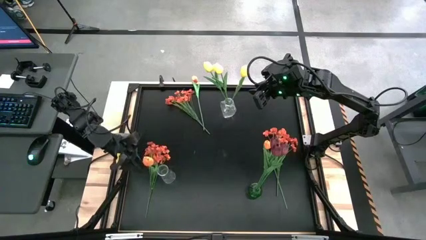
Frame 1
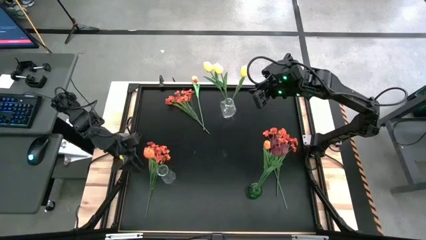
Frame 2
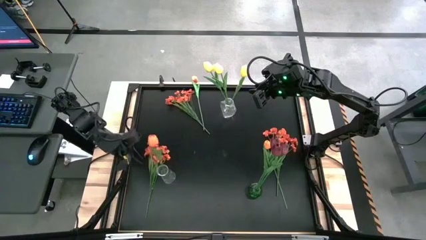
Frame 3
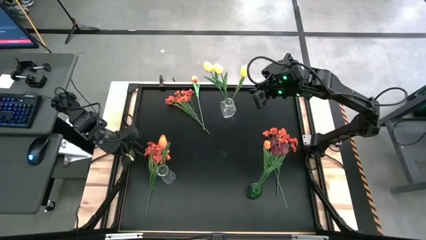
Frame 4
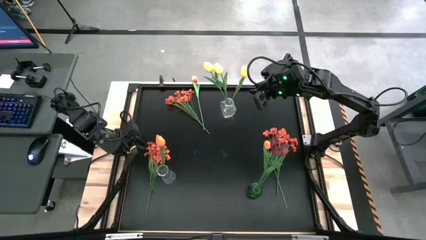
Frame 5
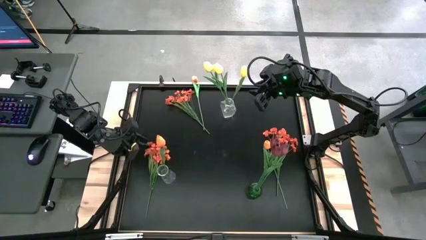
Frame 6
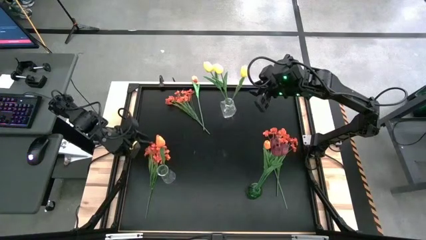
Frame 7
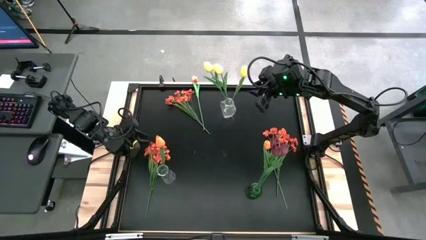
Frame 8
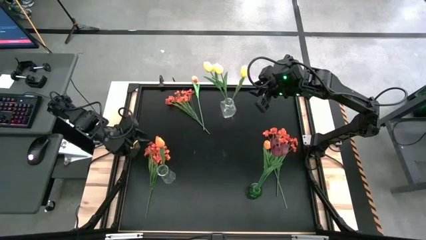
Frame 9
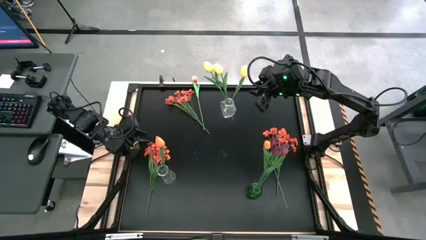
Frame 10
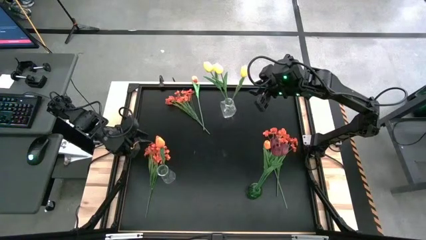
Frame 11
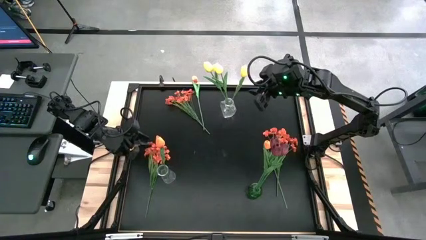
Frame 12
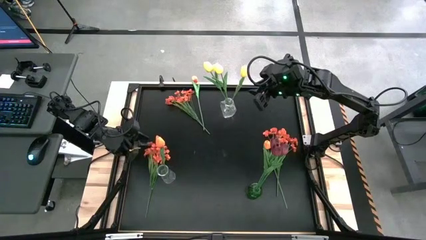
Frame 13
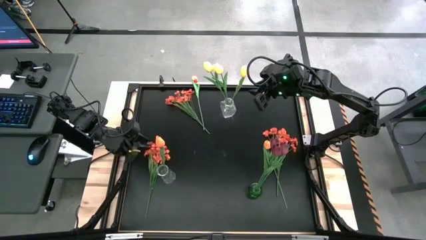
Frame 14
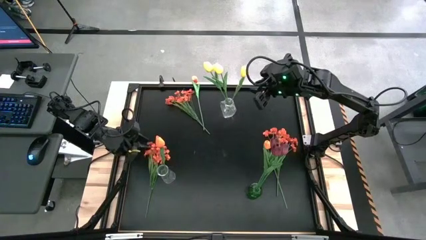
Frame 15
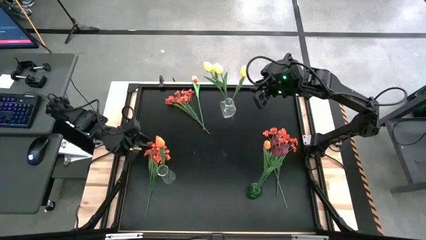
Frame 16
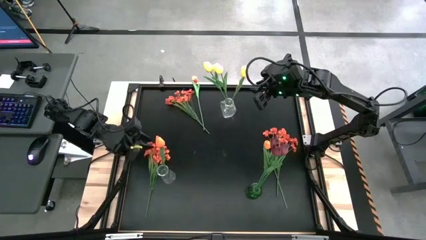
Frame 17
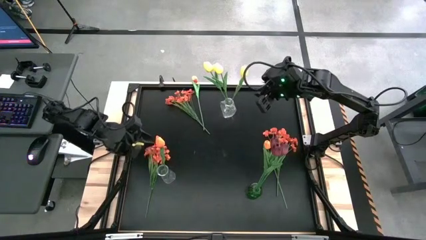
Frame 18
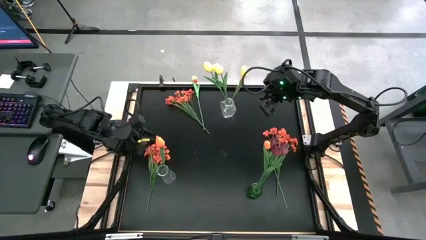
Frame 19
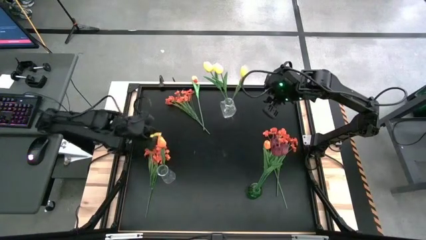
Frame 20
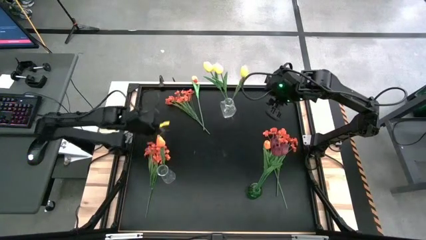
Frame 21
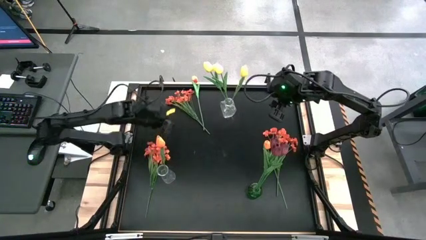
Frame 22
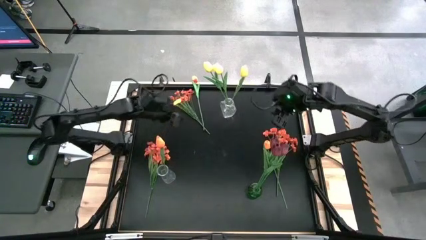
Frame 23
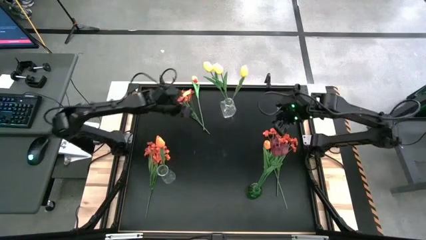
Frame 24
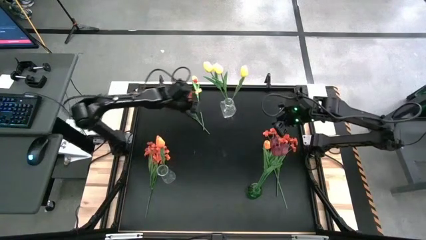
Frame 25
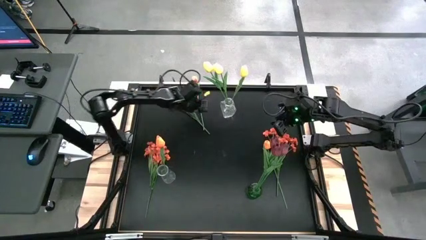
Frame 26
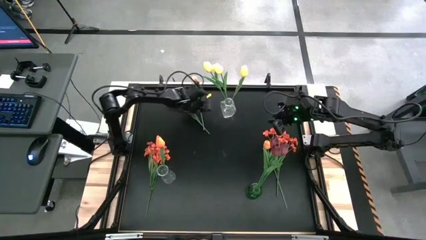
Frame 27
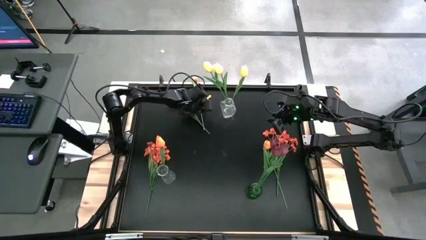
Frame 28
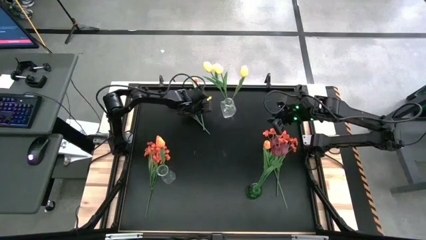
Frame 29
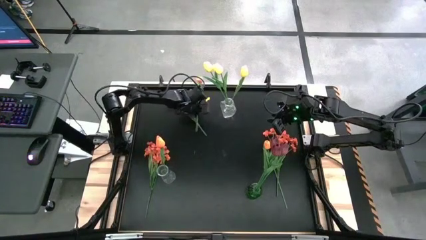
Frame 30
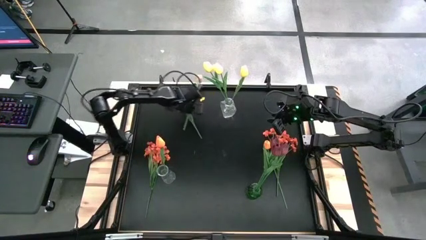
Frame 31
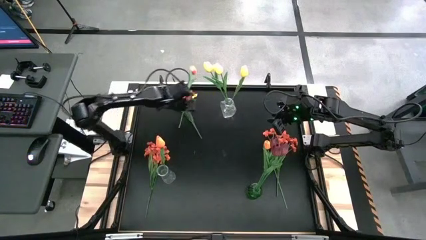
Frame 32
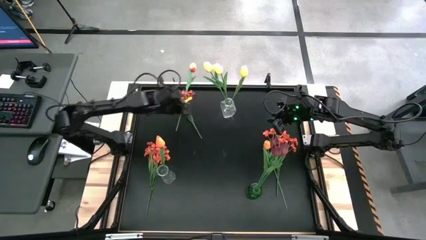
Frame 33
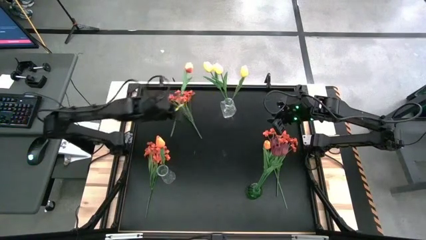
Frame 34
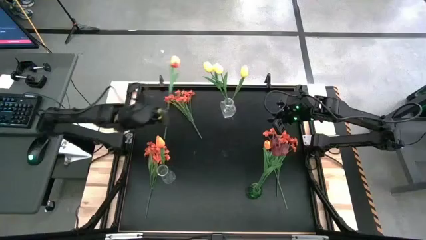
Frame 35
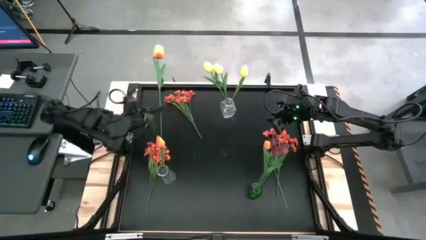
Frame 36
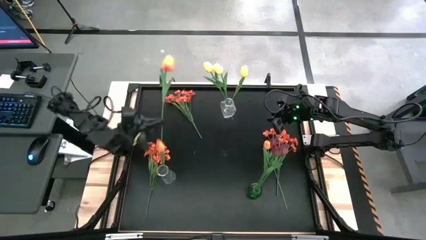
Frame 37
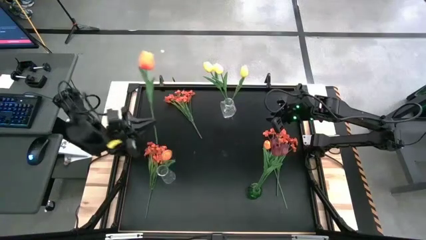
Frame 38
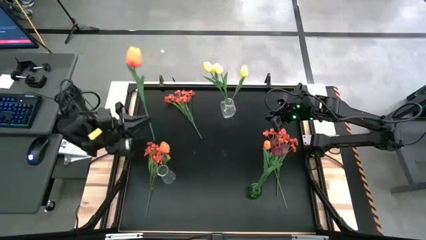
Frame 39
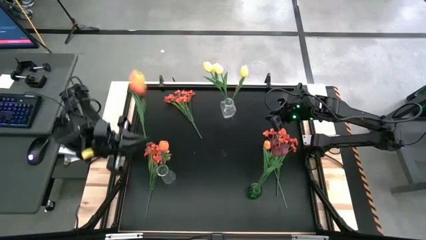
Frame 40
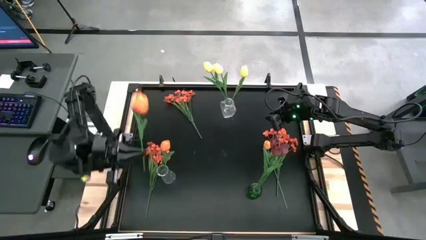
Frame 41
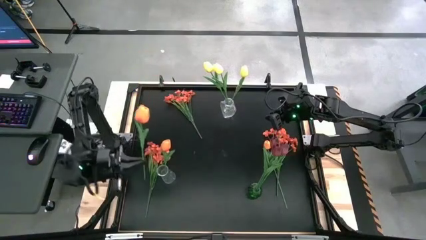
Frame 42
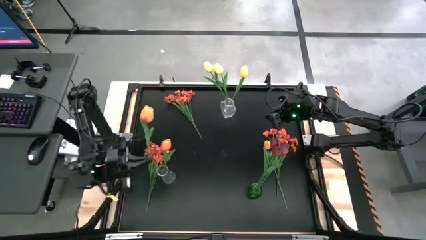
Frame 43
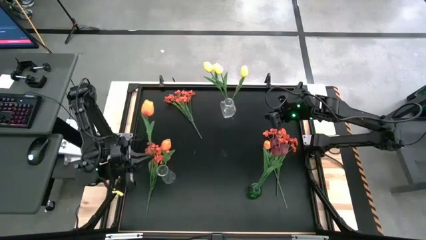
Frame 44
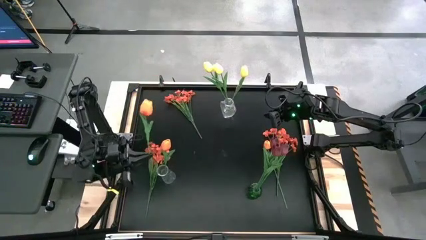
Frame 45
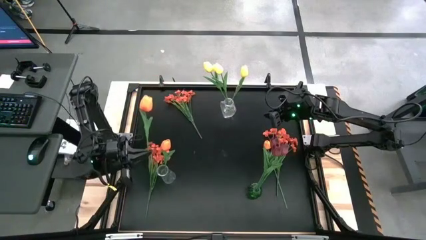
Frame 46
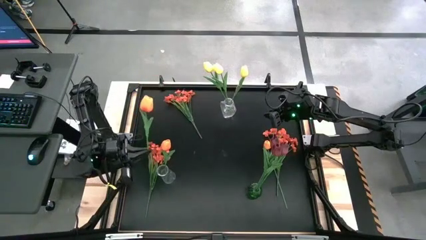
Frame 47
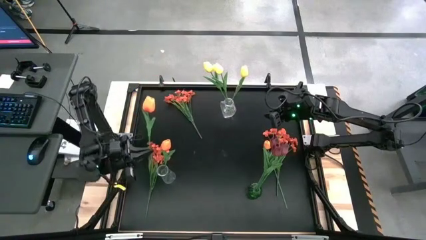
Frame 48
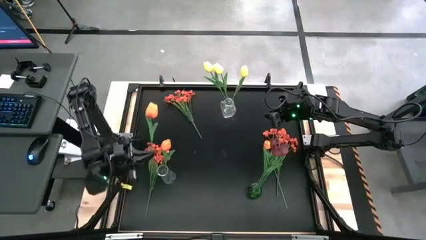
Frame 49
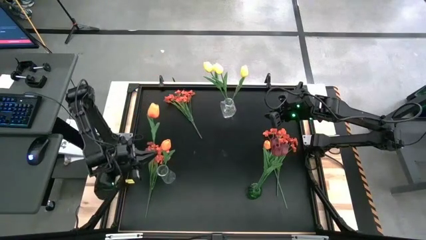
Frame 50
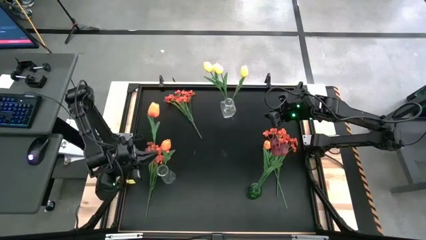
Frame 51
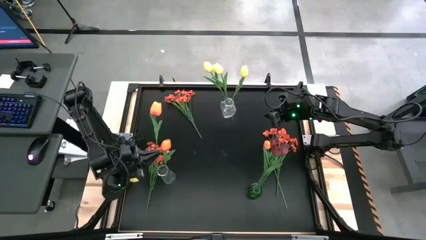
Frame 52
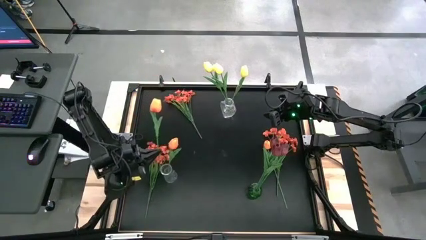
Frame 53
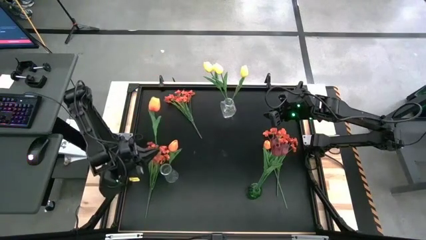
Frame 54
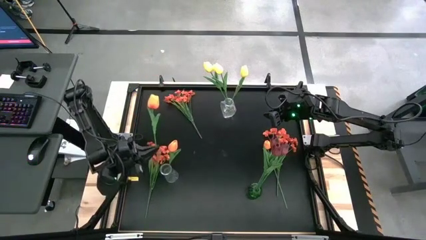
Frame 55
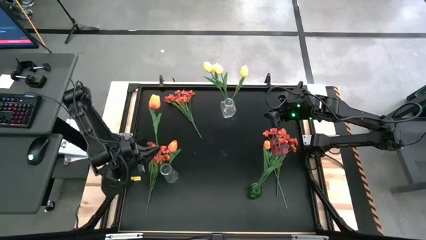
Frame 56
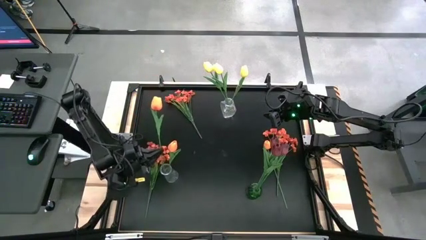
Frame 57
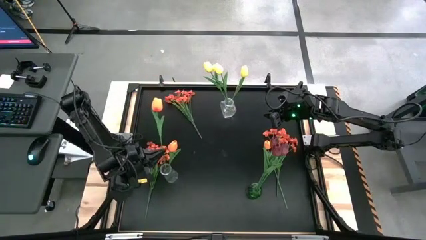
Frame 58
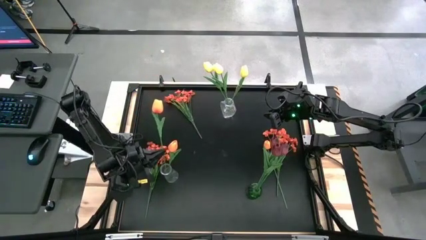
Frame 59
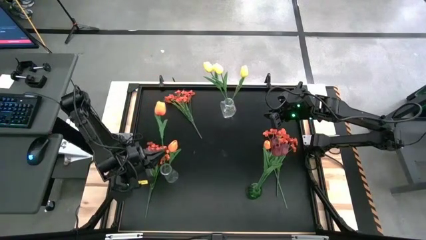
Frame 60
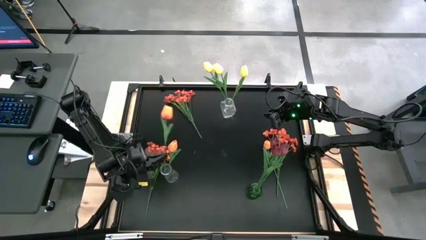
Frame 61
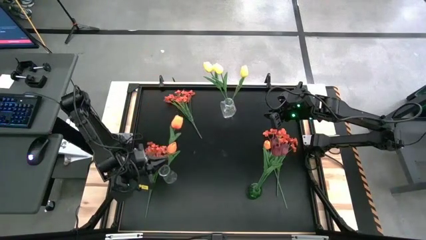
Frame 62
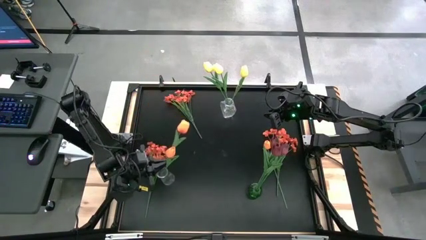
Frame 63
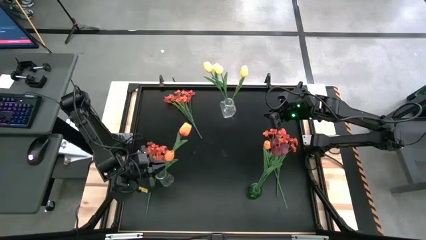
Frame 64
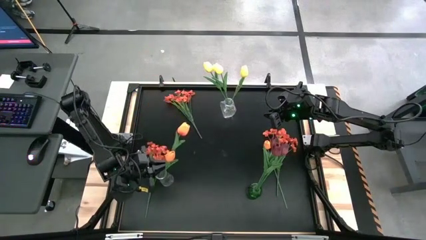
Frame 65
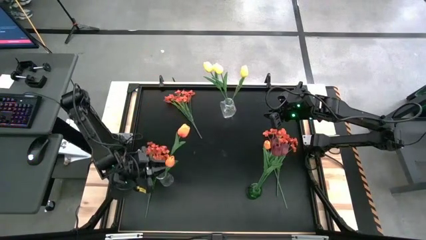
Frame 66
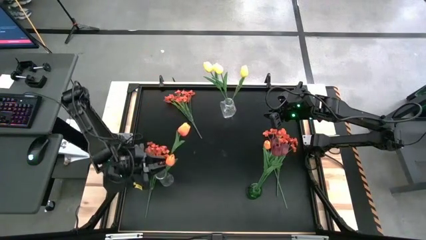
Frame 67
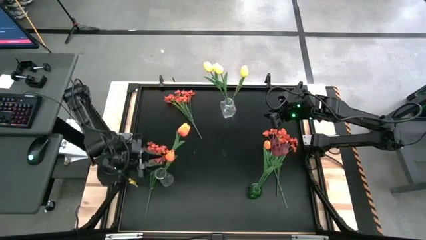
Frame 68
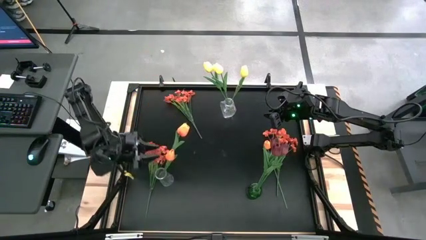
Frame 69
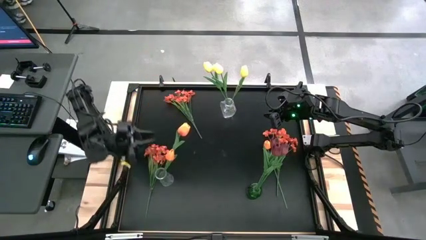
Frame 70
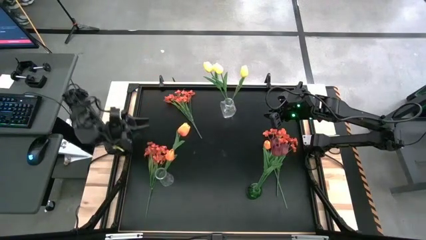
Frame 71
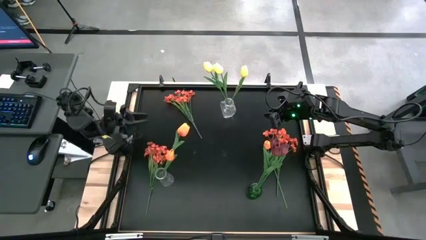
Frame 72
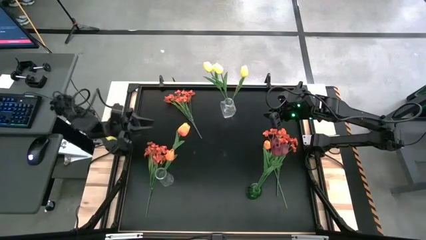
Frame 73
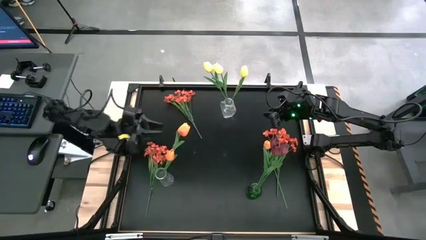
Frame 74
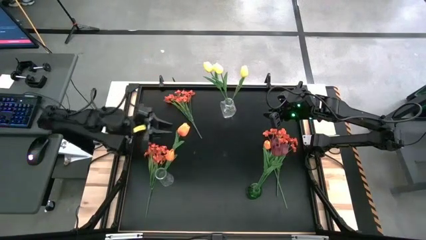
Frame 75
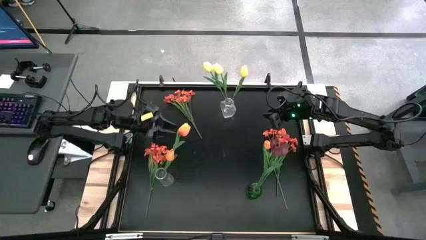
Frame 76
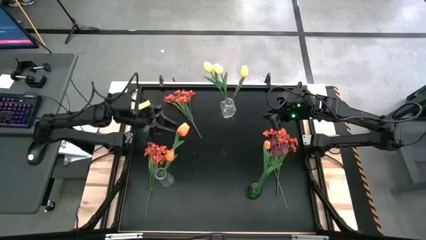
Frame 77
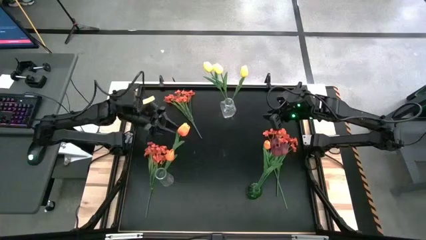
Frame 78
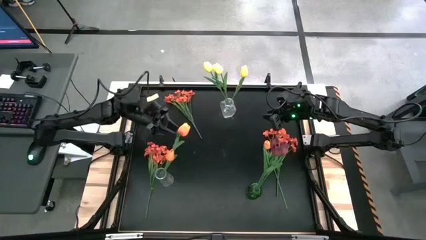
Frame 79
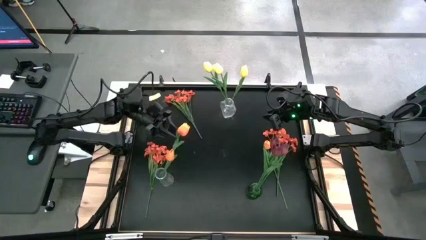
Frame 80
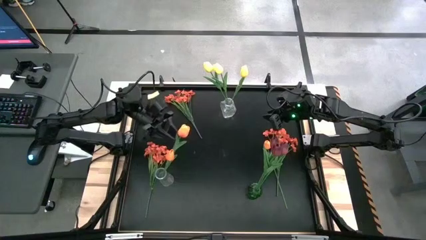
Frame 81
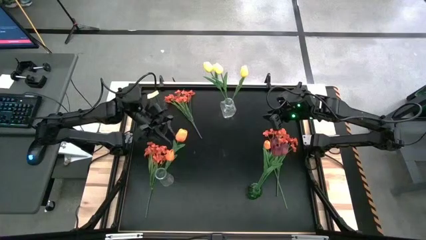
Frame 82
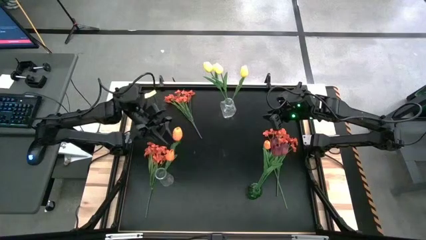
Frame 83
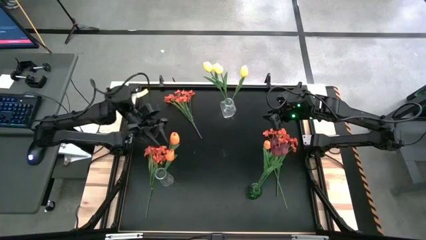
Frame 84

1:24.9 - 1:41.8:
Task: Sort flowers into vase by color
Put the top orange tulip into the bottom transparent vase
